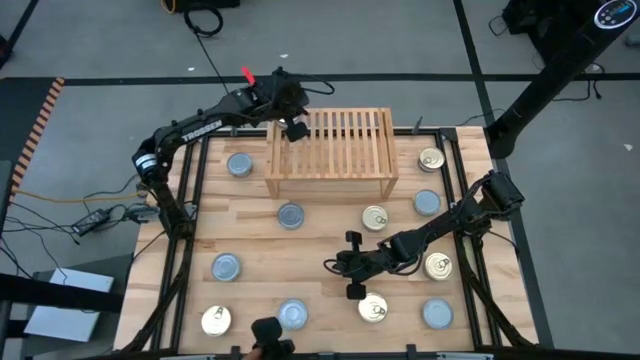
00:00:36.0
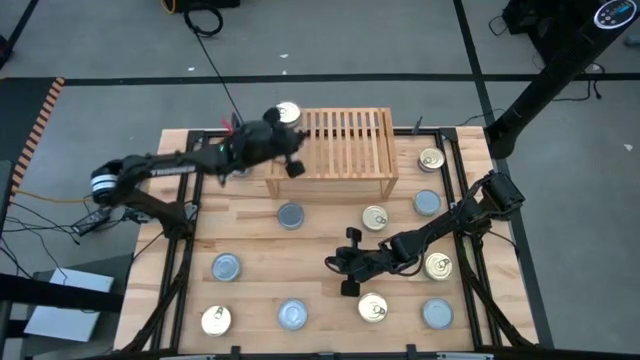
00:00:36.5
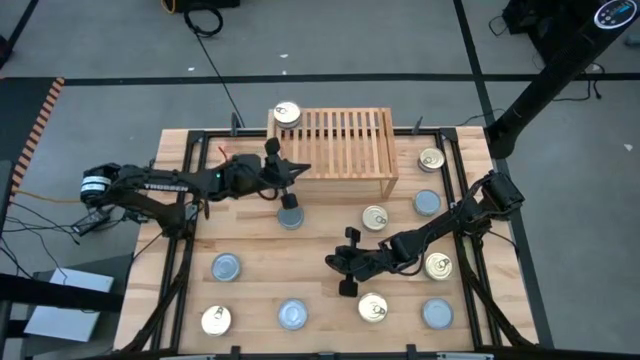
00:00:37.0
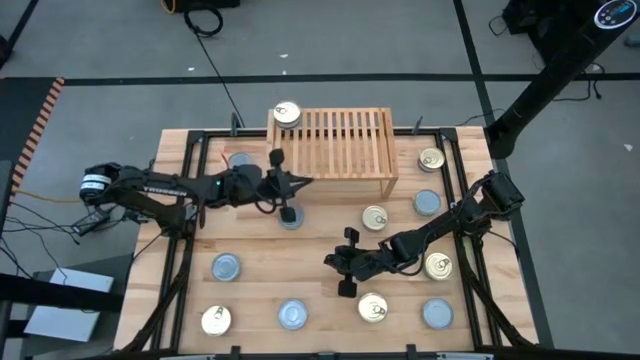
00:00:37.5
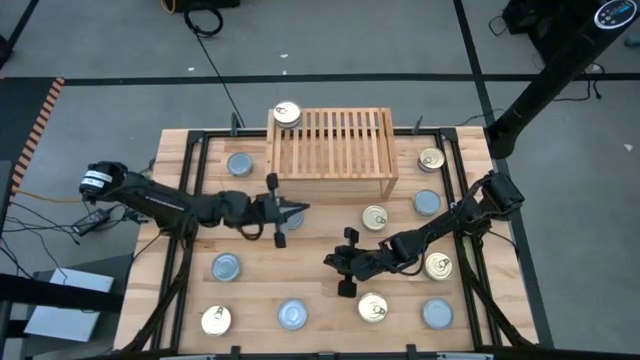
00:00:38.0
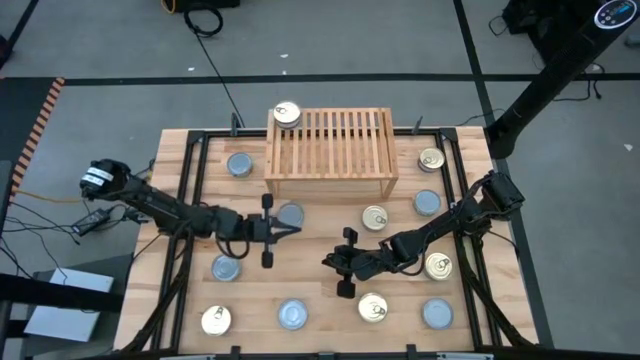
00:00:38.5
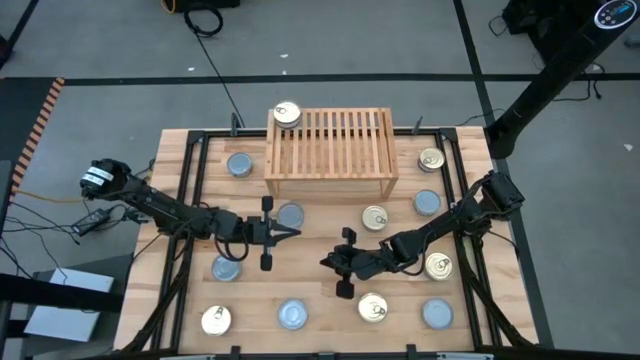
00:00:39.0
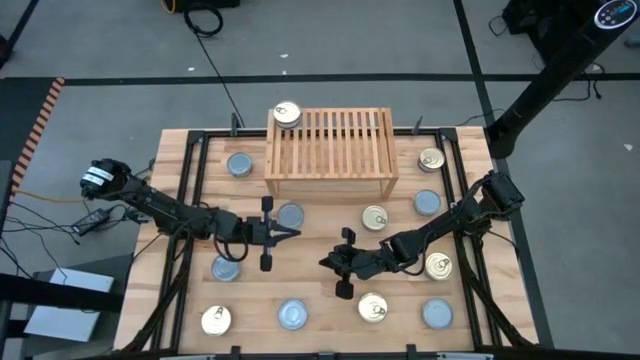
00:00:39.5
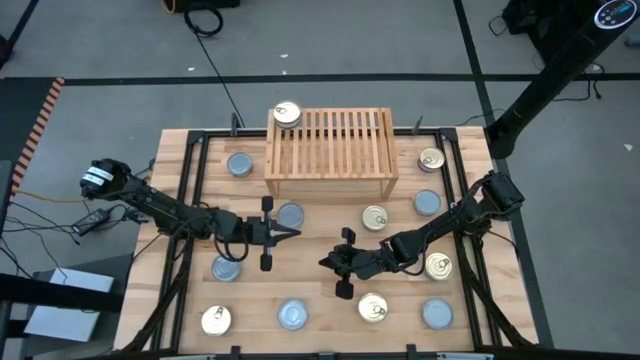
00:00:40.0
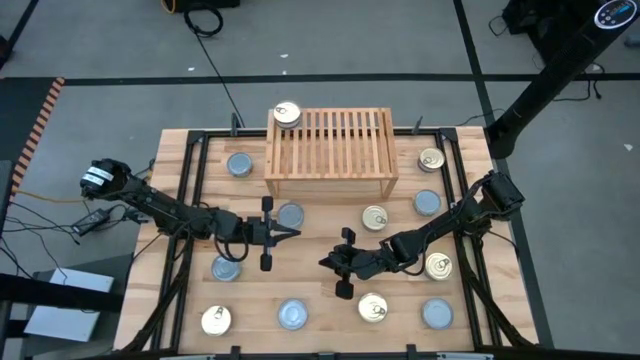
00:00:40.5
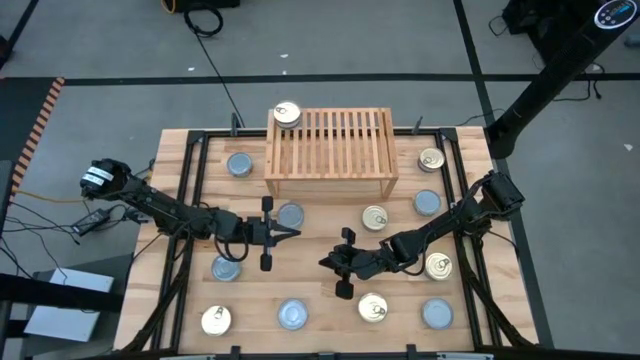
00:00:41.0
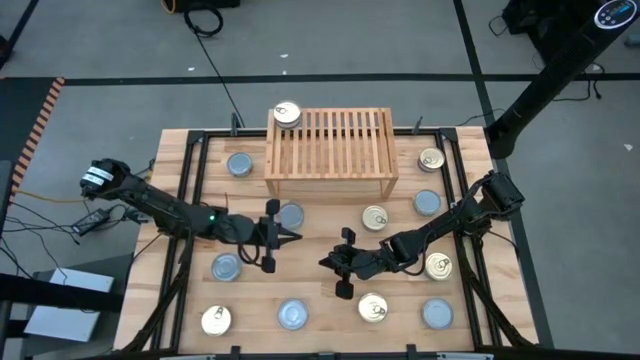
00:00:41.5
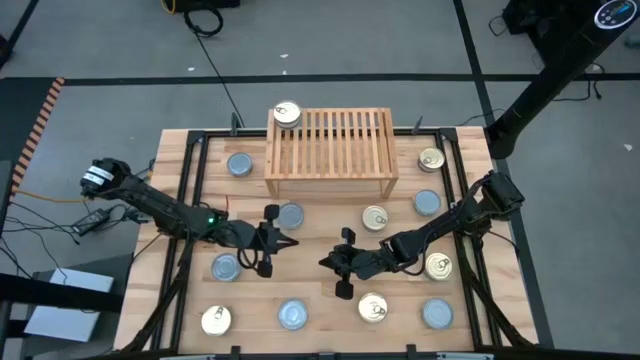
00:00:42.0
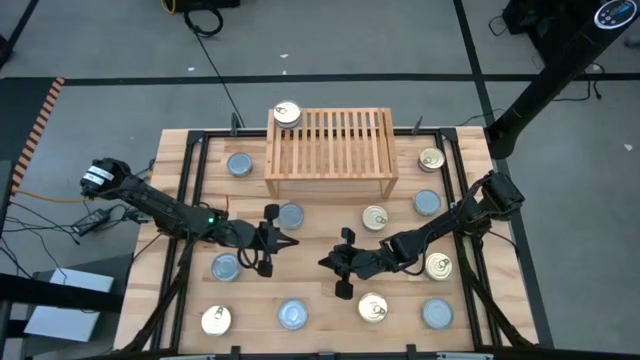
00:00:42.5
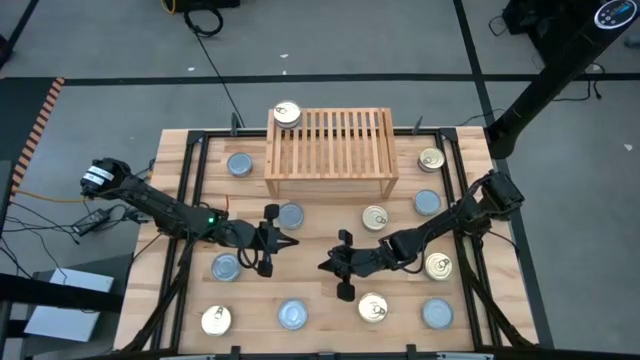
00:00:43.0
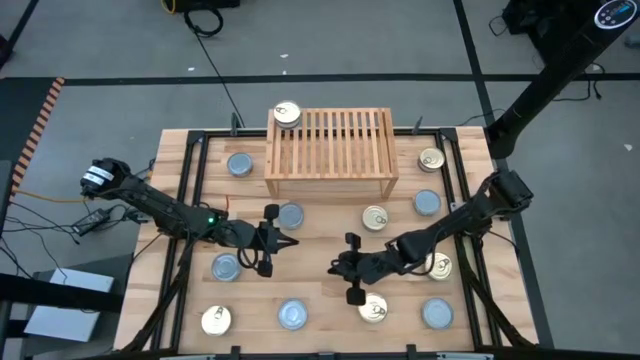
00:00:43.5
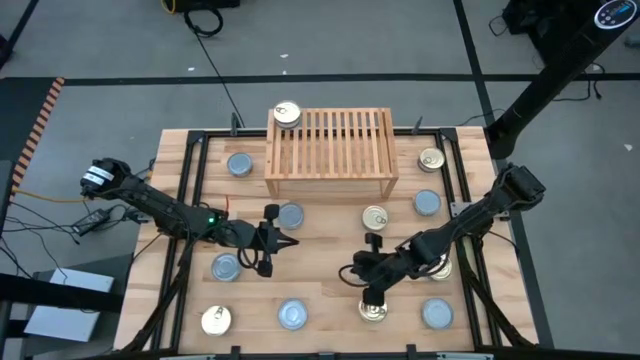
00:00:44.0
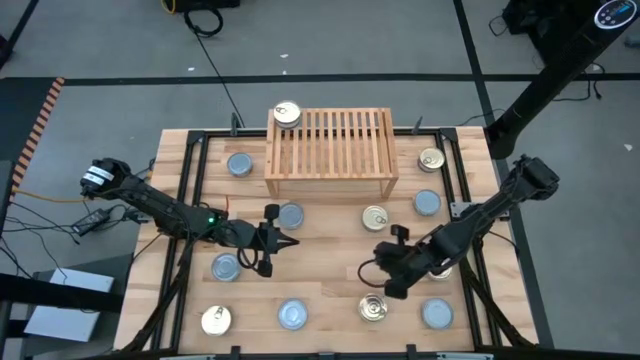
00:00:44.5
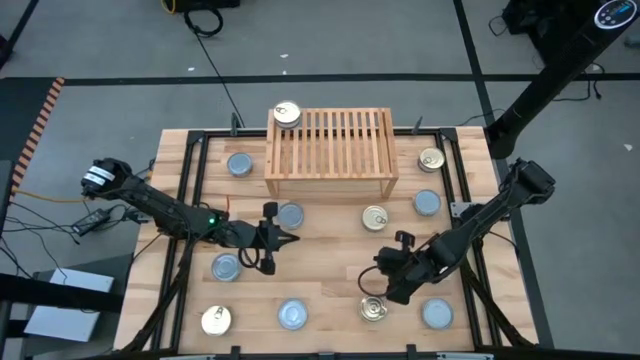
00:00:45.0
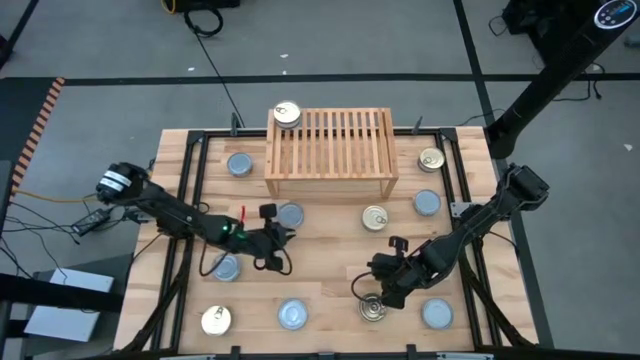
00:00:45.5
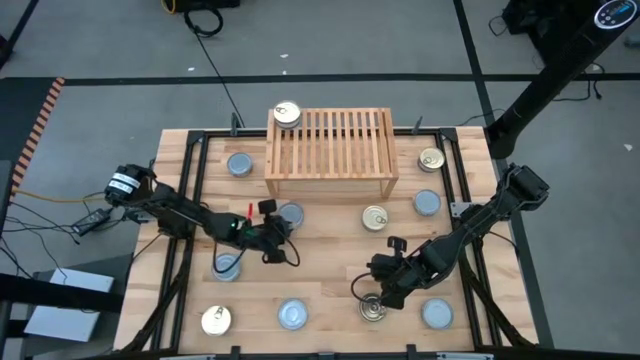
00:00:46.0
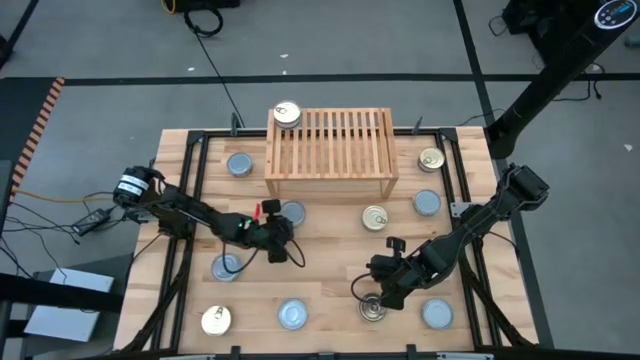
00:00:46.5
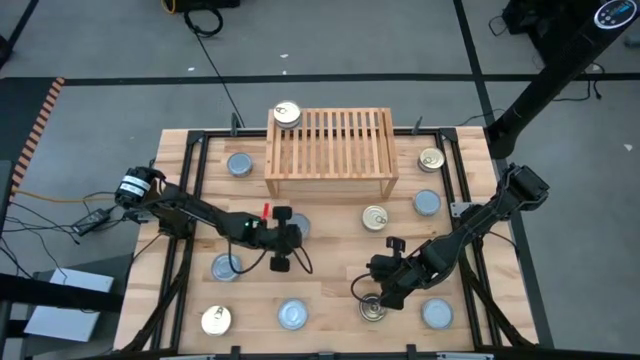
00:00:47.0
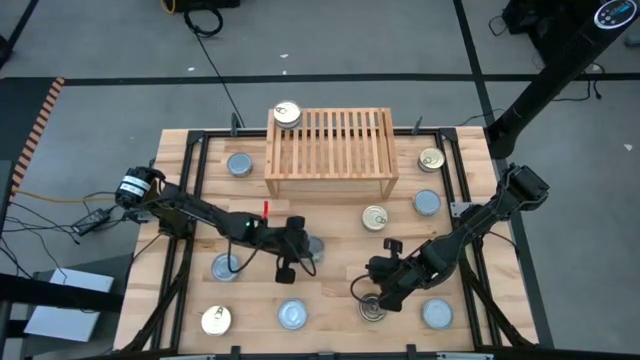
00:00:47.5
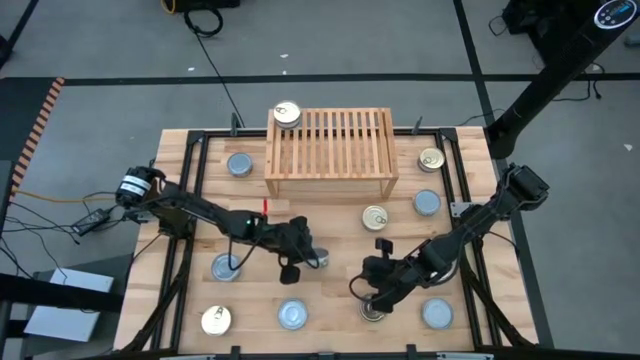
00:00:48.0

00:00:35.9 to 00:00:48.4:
Task: Stack canned seafood by type on shelf
Put the green tuna can on the shelf

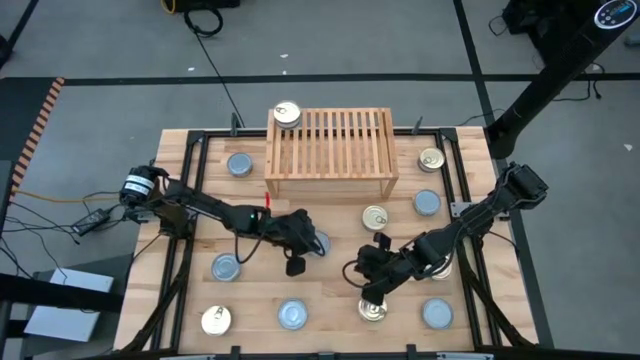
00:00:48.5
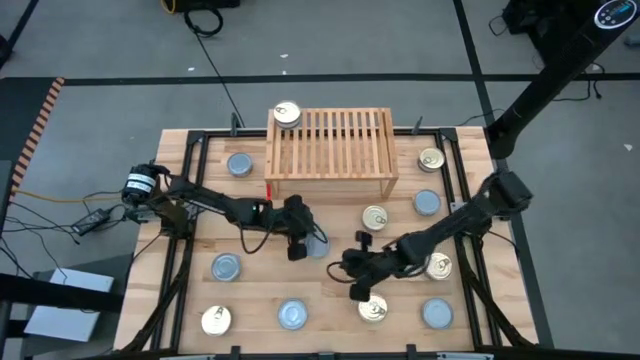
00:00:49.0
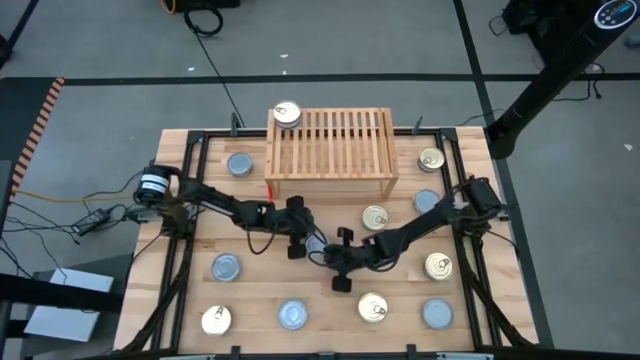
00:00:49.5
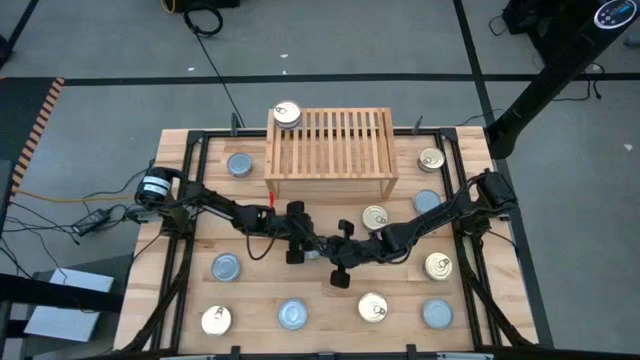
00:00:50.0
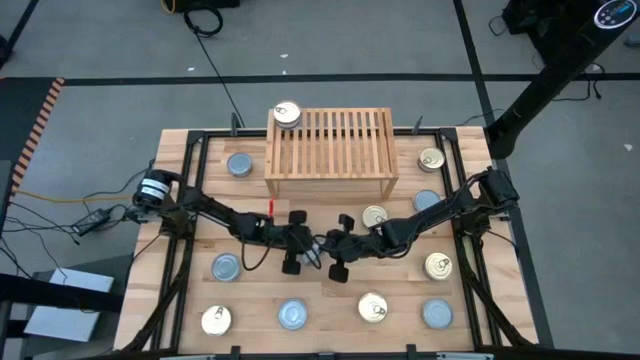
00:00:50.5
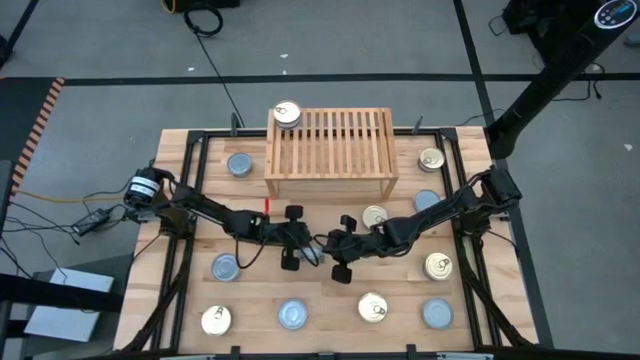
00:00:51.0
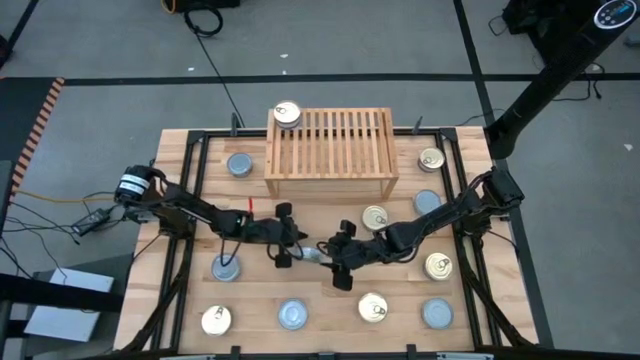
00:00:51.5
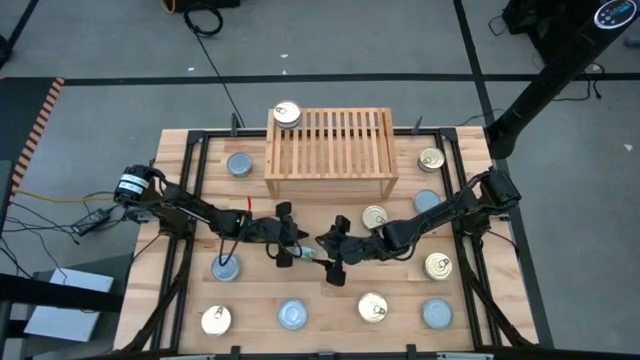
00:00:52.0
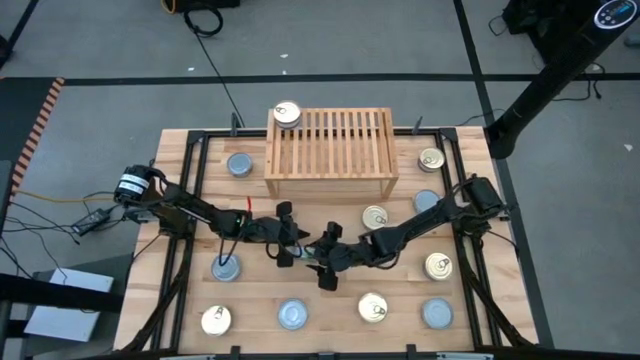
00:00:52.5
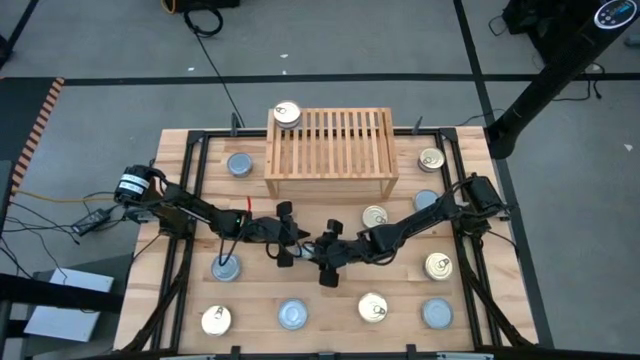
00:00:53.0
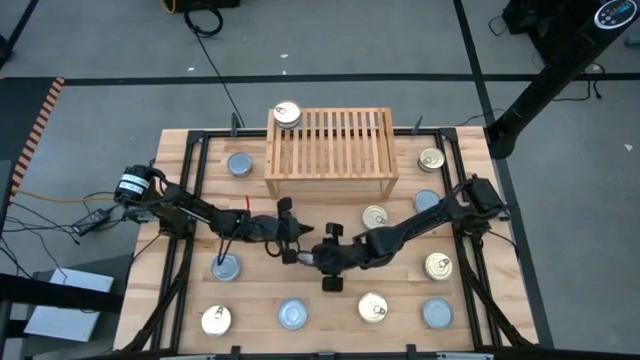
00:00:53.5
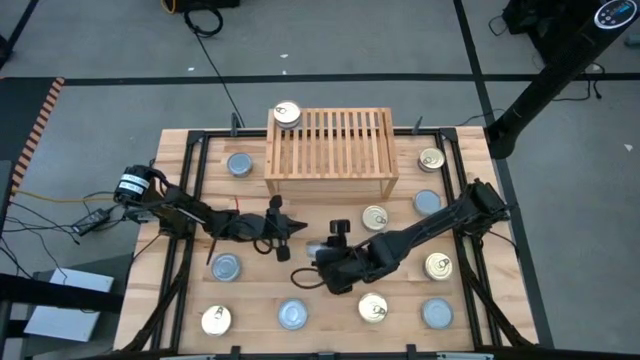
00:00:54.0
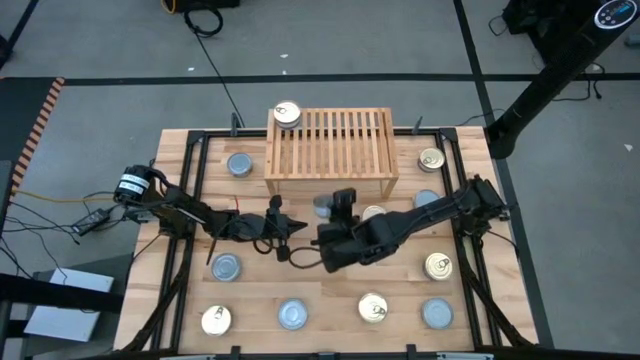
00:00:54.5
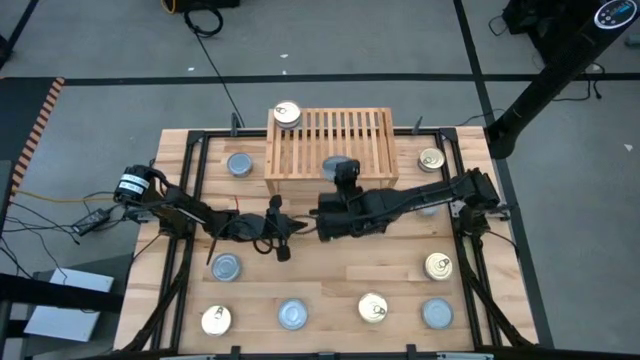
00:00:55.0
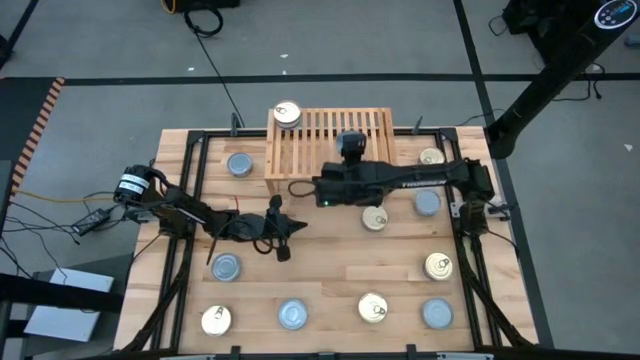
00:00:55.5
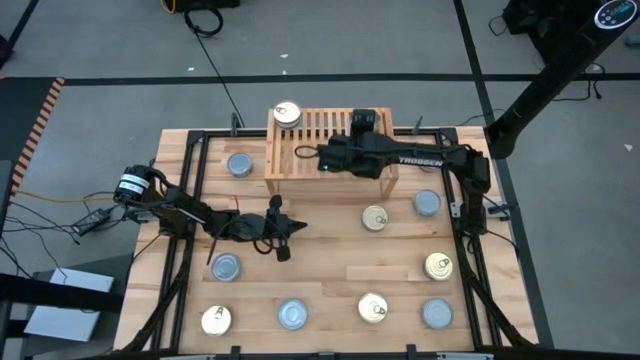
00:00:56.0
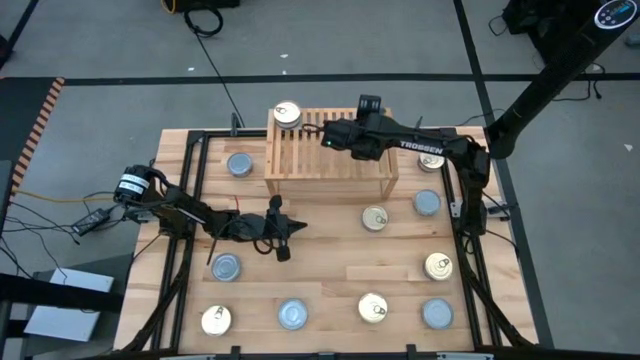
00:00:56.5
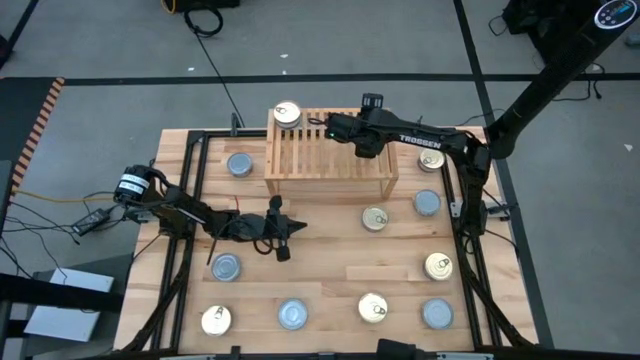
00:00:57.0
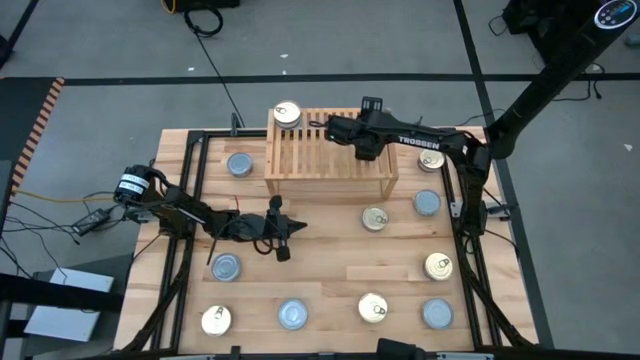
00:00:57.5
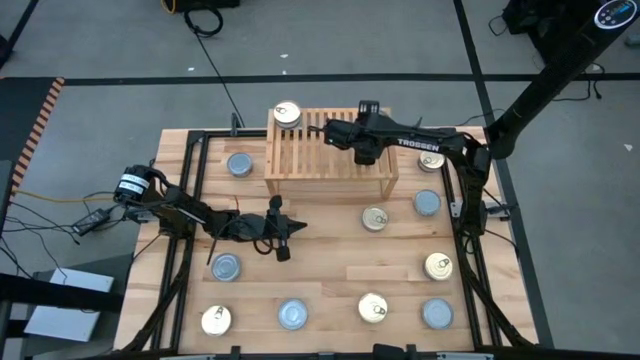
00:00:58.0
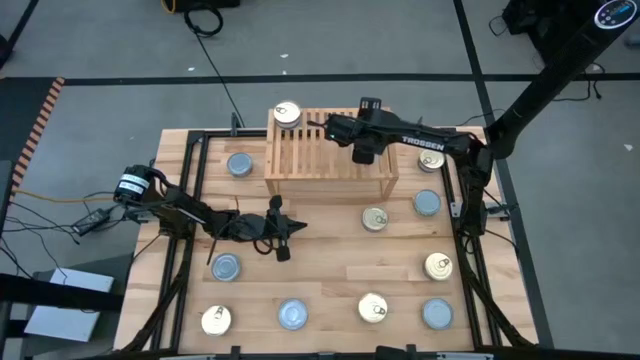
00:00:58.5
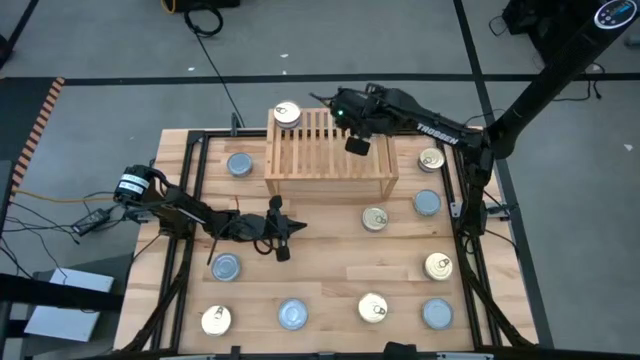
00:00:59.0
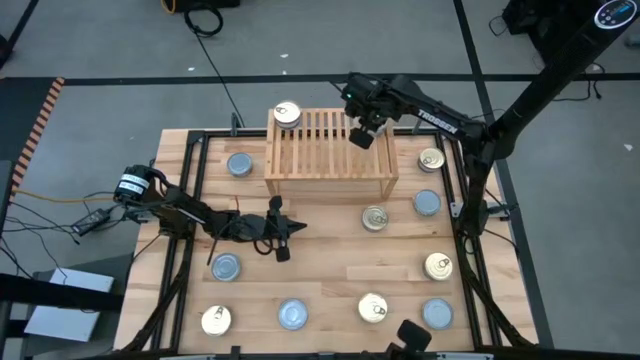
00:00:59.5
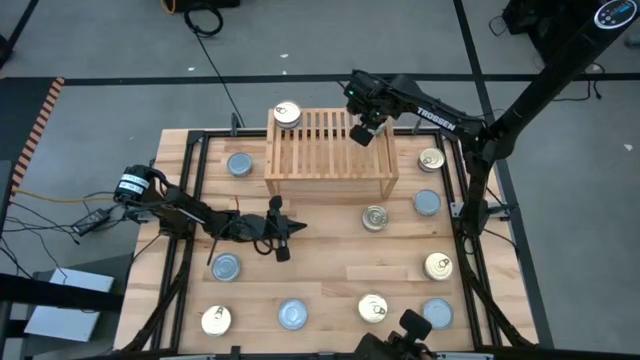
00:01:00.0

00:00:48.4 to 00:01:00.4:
Put the green tuna can on the shelf
